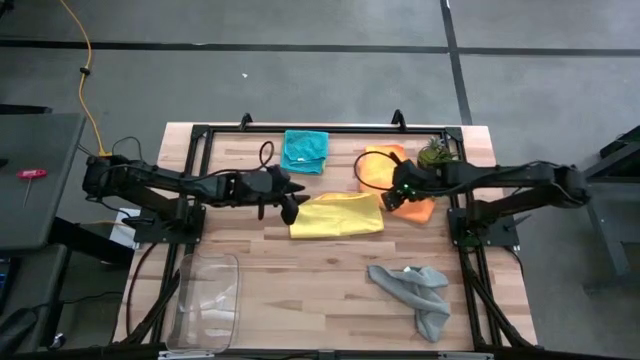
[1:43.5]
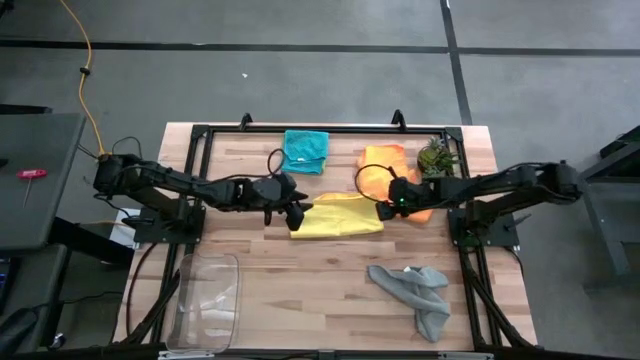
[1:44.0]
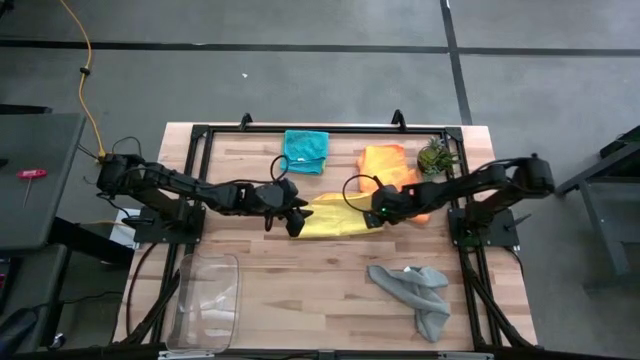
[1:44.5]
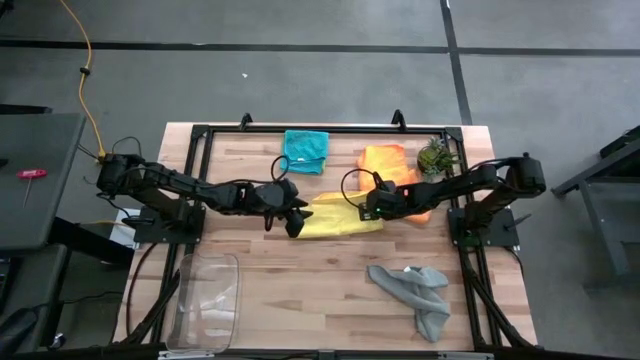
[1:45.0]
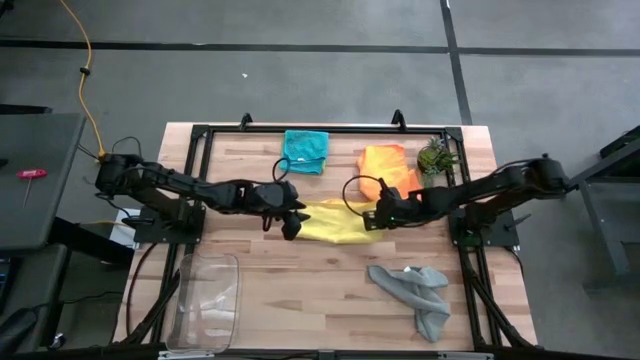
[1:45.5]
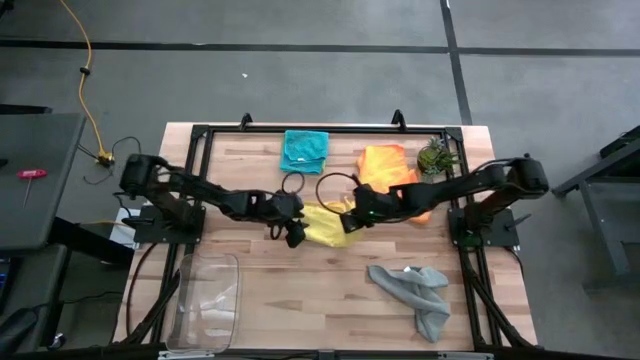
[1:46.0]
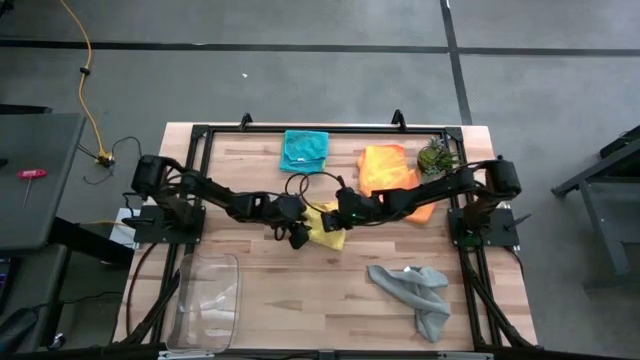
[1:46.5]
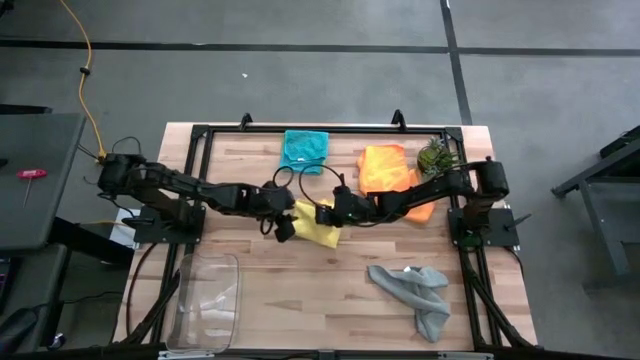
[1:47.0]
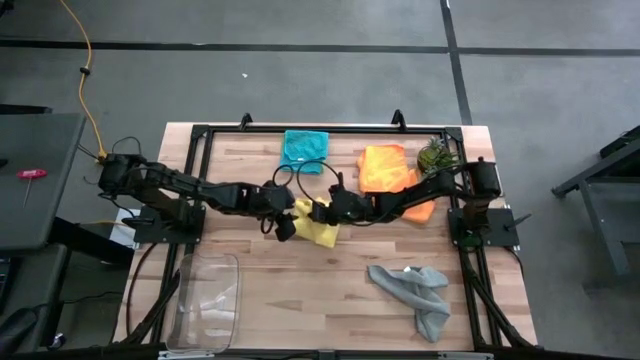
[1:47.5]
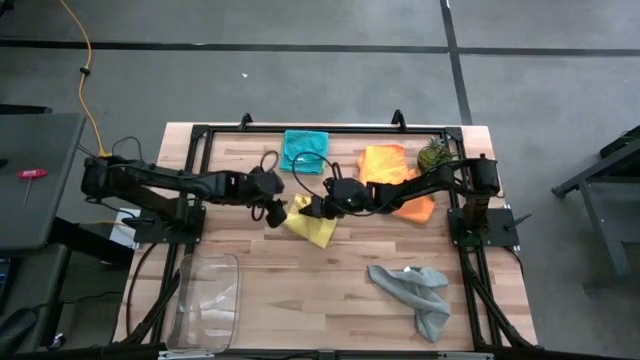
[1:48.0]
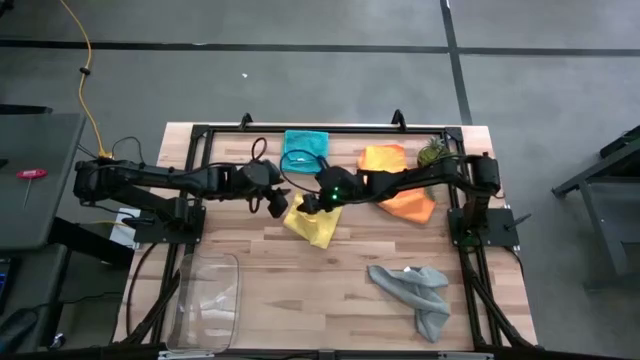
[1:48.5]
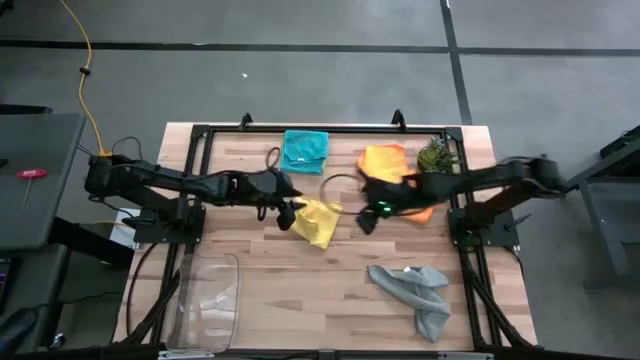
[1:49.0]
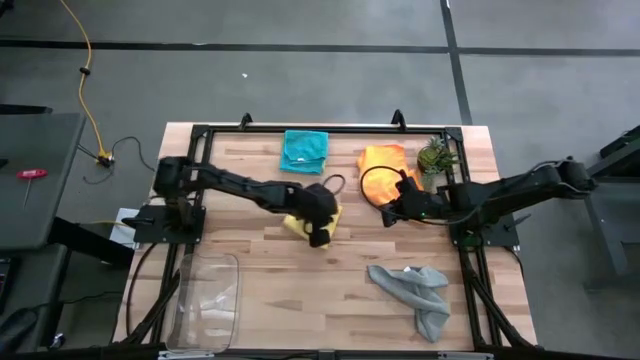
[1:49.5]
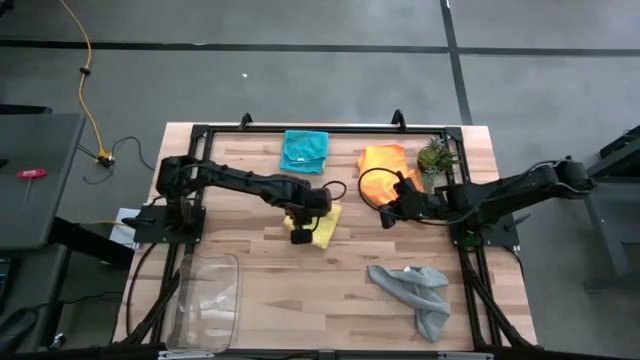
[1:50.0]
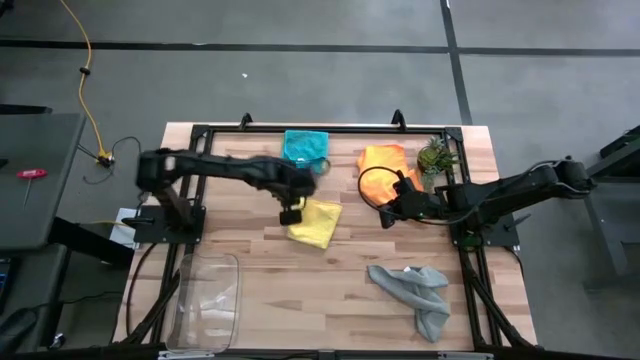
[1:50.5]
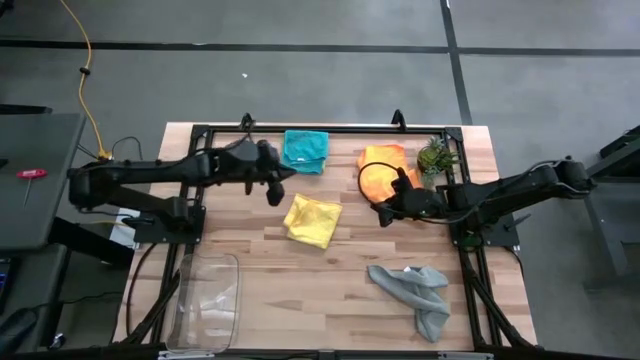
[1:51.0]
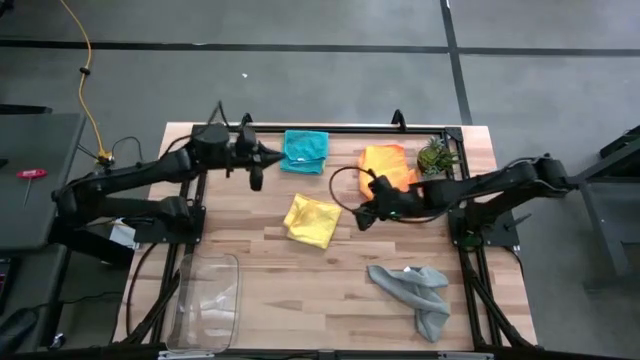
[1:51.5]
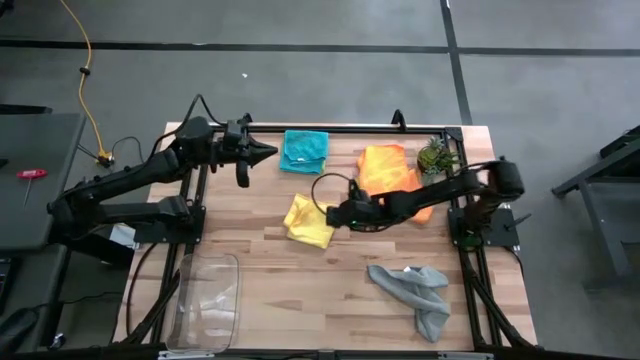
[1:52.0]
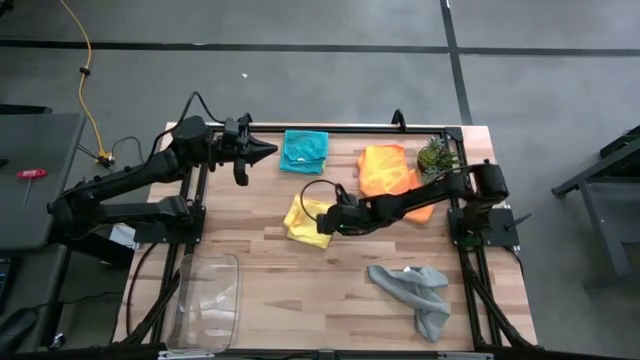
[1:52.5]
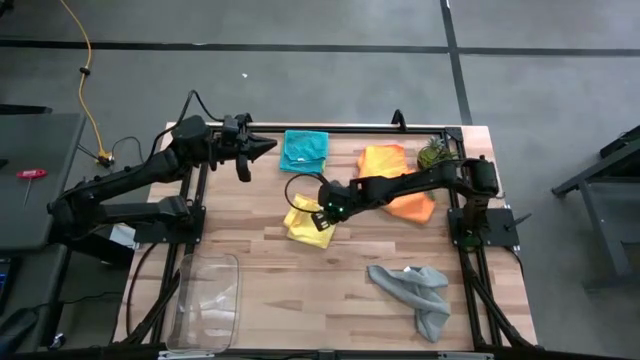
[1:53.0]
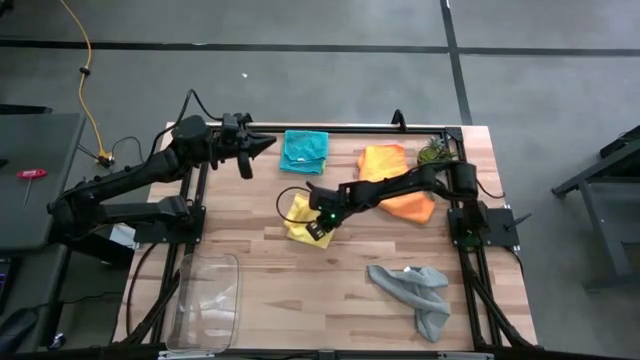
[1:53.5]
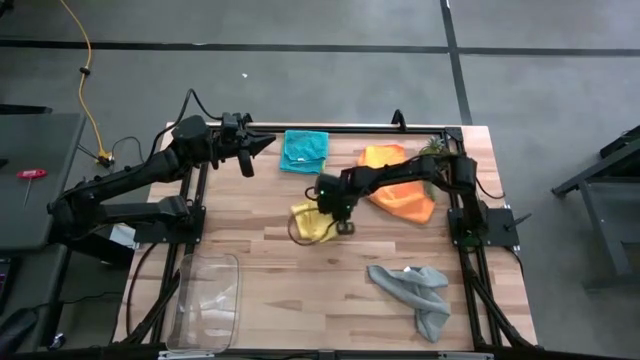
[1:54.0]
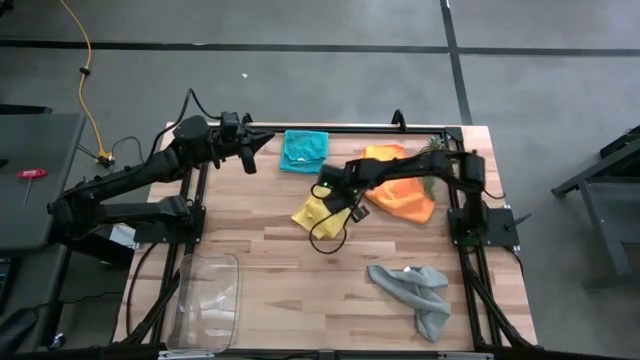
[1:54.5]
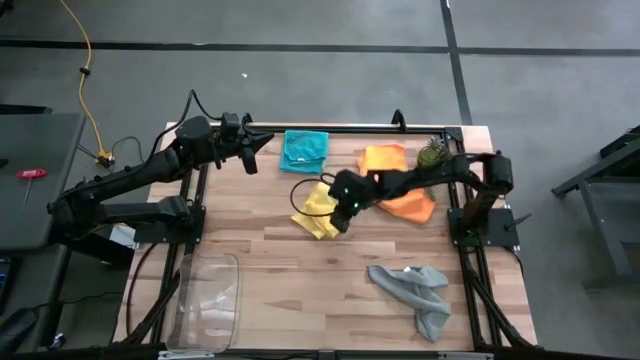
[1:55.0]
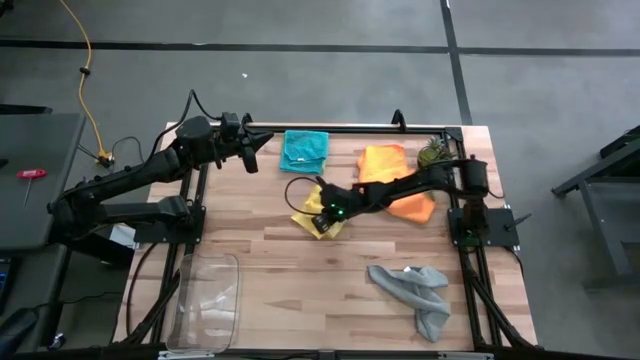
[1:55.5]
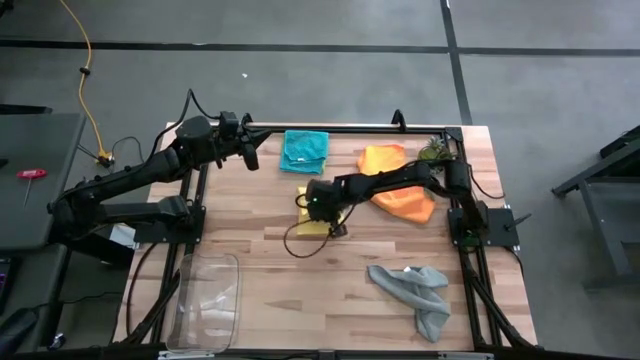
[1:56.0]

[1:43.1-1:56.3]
Task: Fold microfiber towels
Fold the yellow microfiber towel

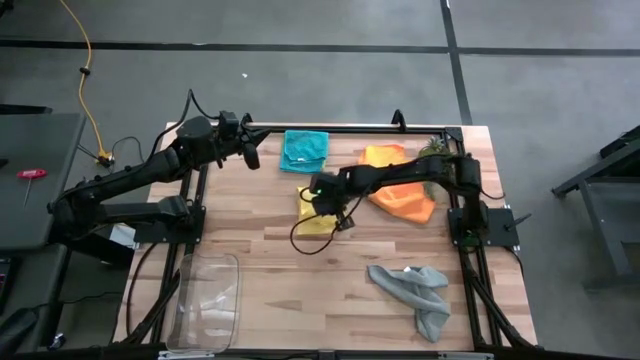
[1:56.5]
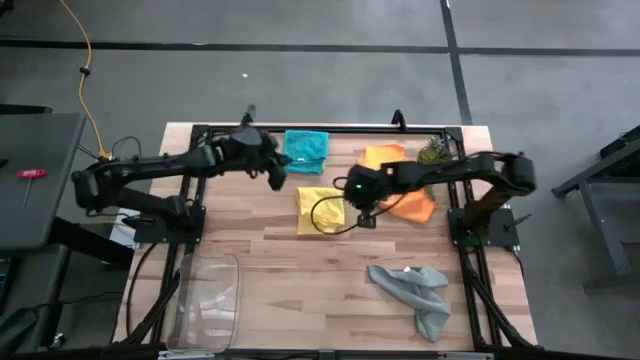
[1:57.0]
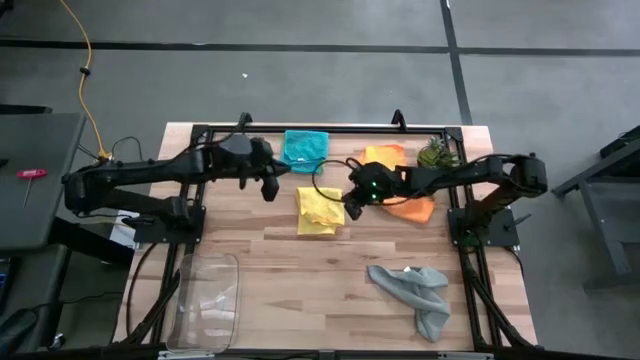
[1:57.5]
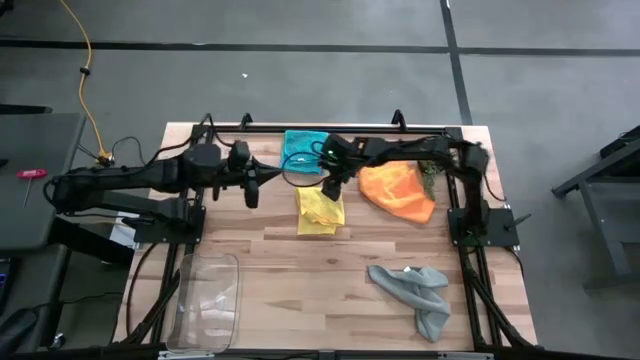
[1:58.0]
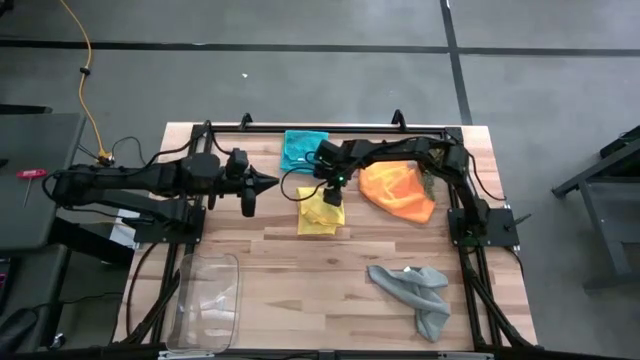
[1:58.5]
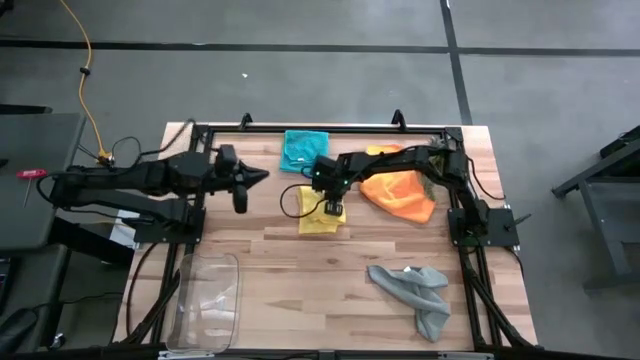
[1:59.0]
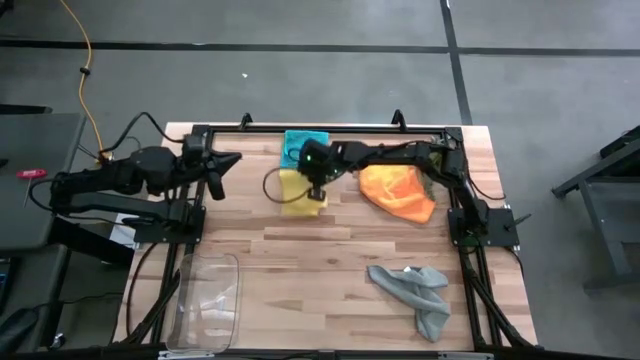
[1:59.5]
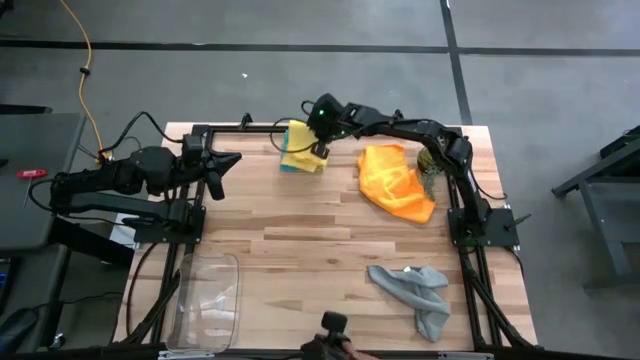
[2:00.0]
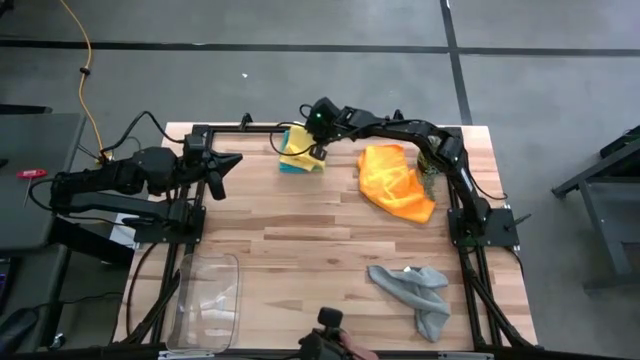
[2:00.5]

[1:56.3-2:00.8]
Stack the yellow microfiber towel on the folded microfiber towels

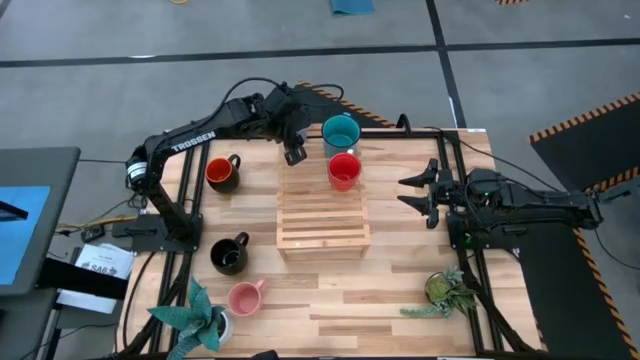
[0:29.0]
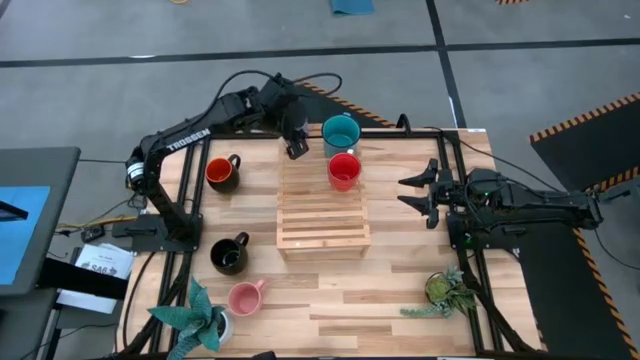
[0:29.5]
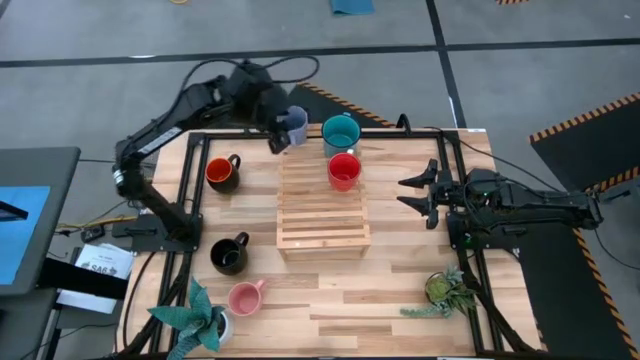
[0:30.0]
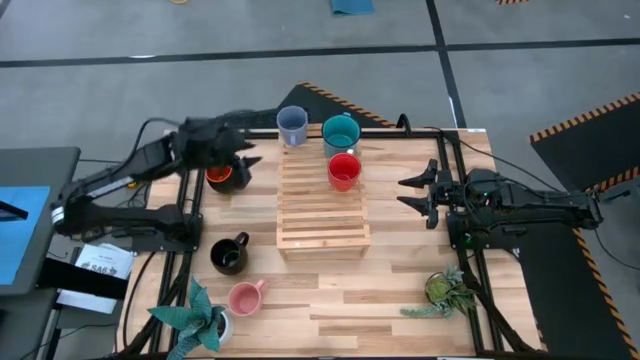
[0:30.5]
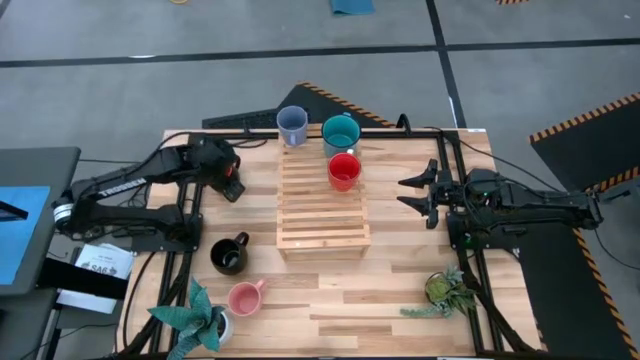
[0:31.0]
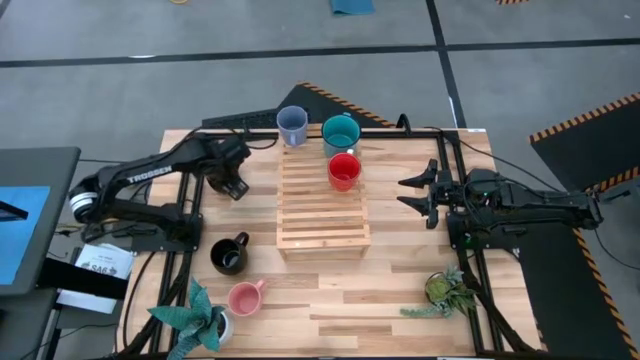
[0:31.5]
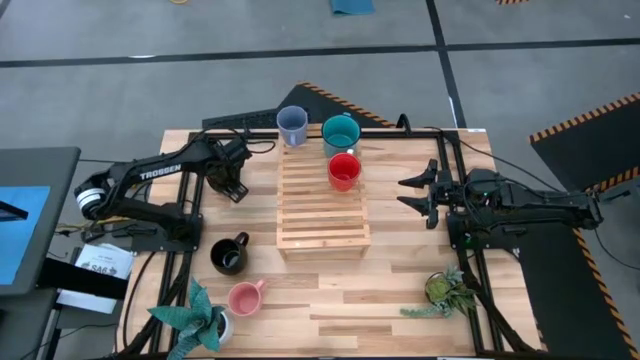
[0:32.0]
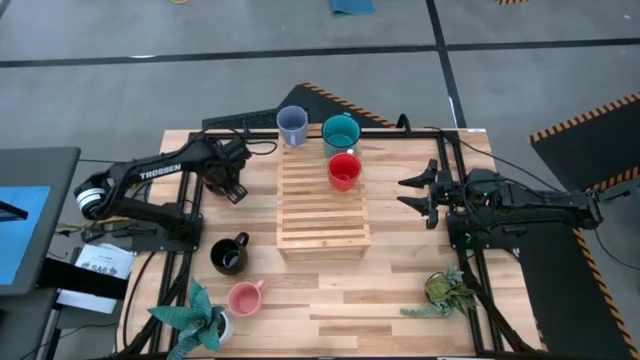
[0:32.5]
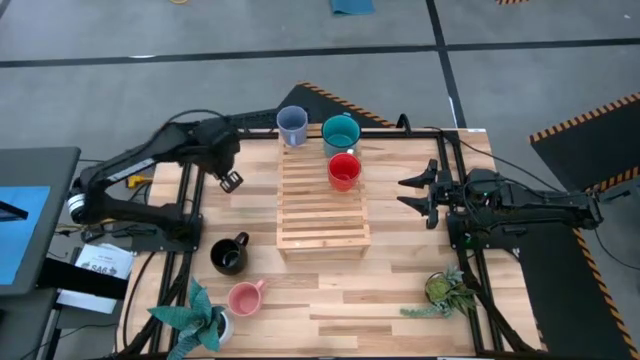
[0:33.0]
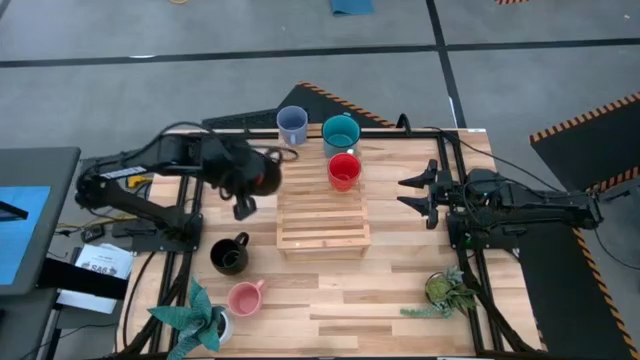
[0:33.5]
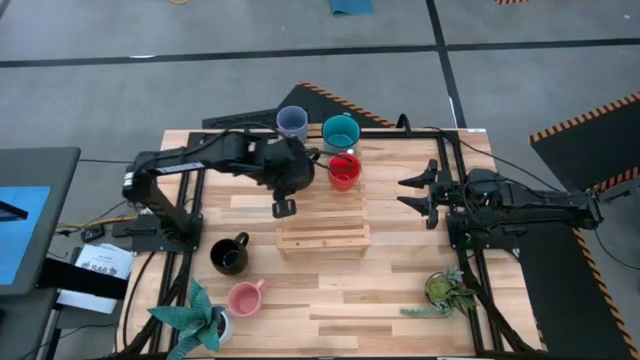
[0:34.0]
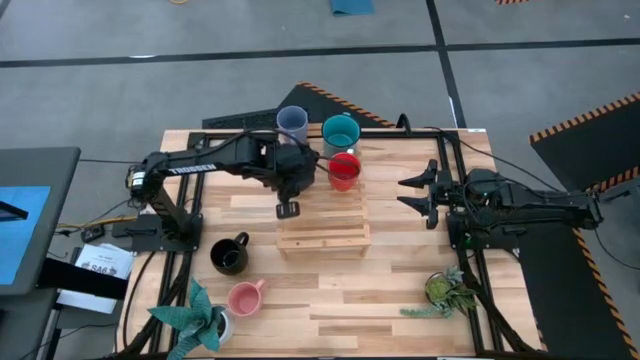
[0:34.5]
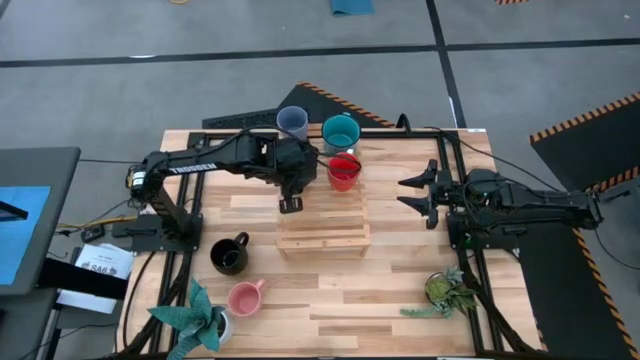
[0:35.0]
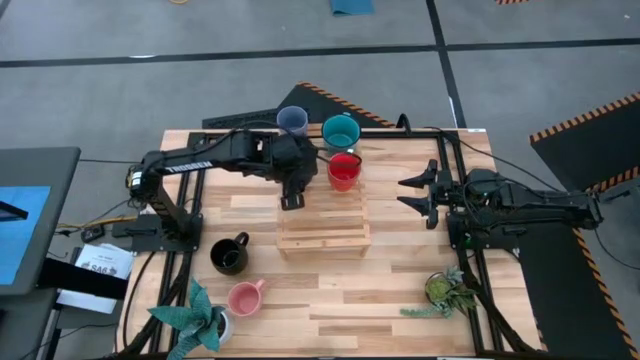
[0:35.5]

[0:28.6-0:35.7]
Task: Place coffee mugs
Put the orange mug on the shelf aligned with the light blue mug
